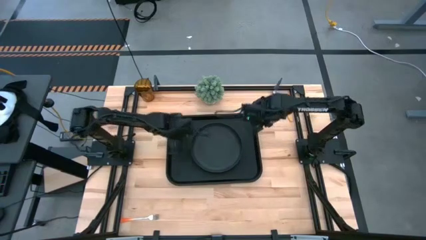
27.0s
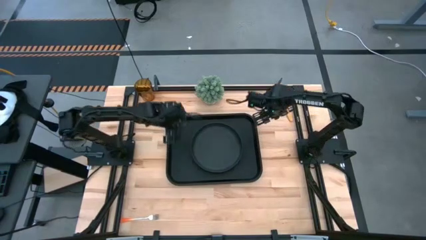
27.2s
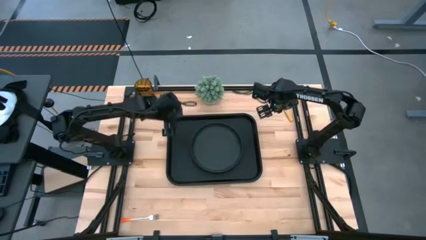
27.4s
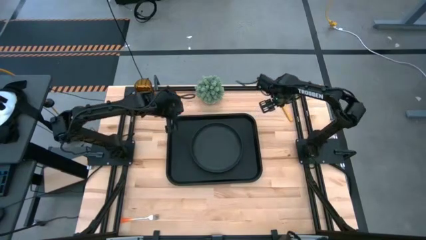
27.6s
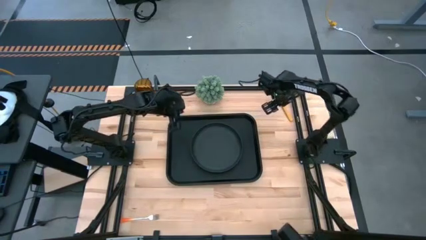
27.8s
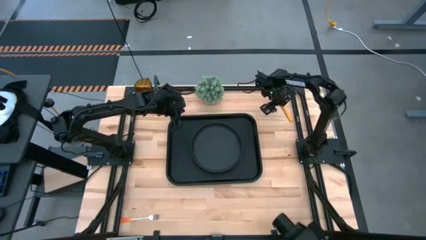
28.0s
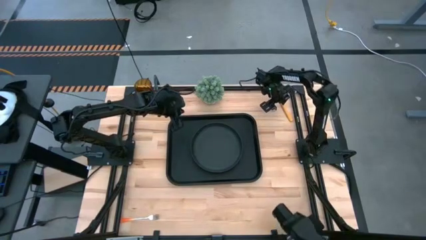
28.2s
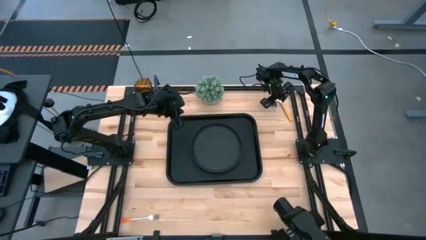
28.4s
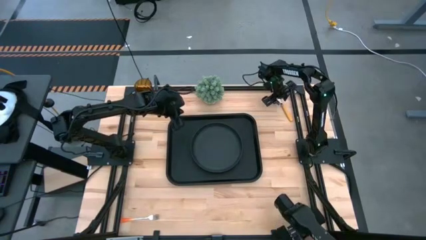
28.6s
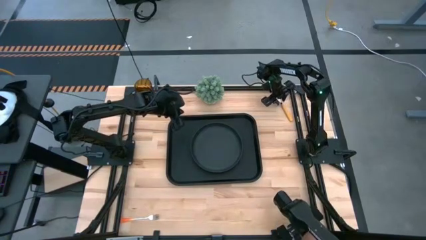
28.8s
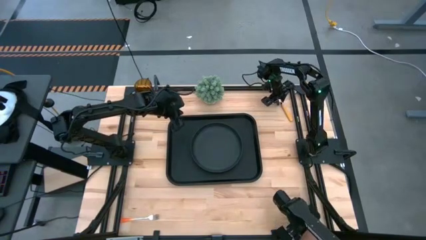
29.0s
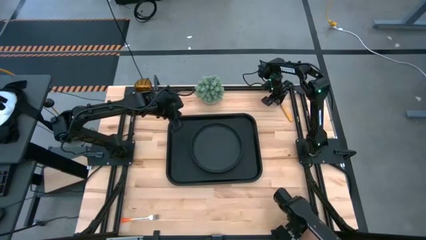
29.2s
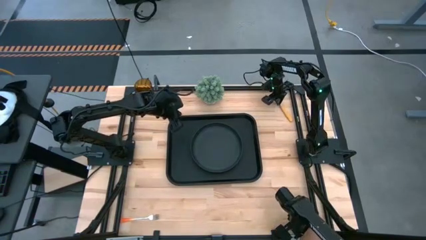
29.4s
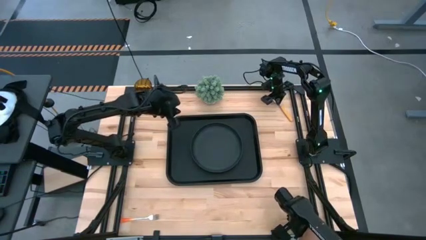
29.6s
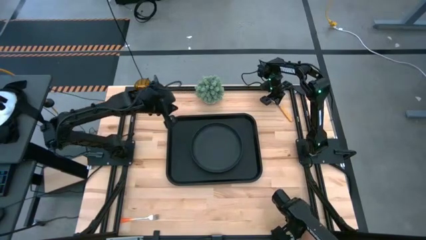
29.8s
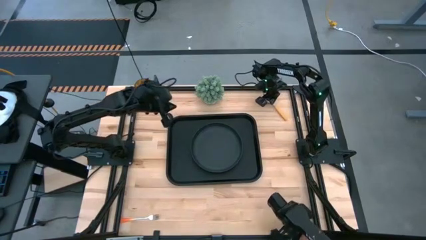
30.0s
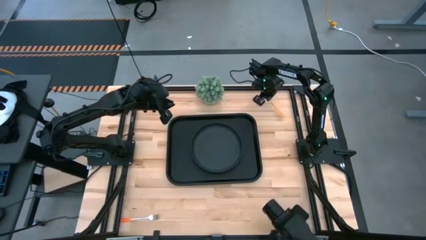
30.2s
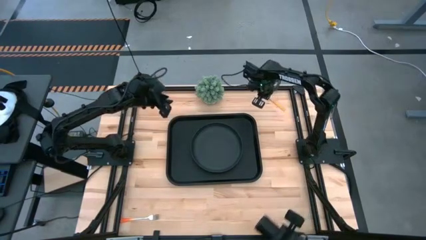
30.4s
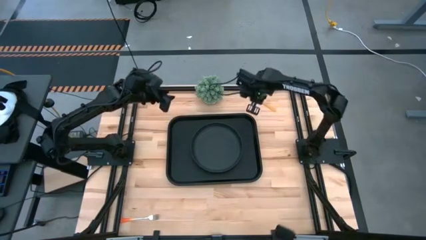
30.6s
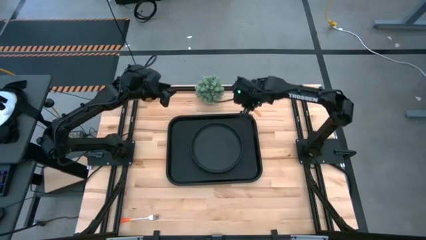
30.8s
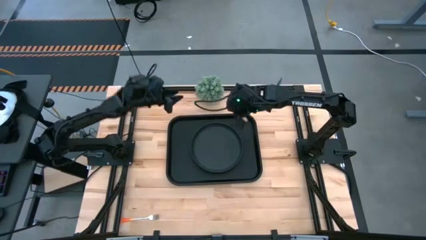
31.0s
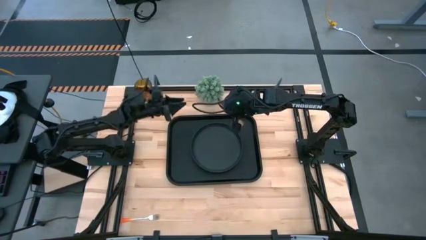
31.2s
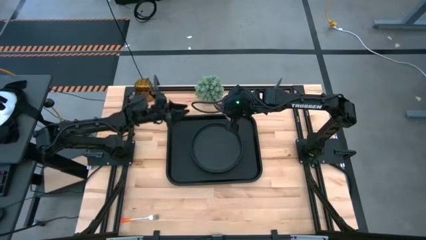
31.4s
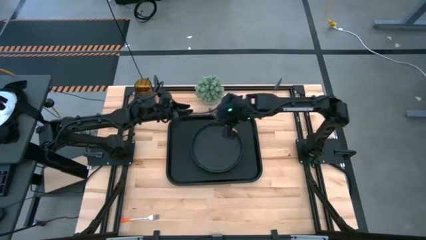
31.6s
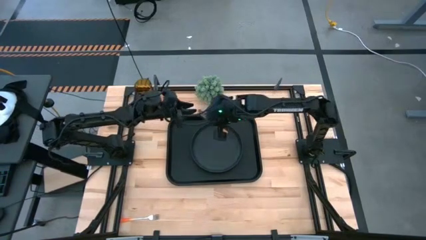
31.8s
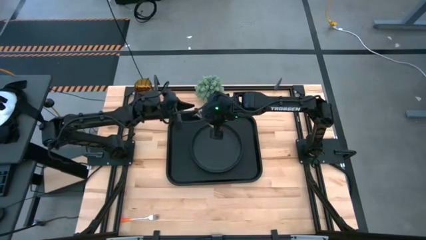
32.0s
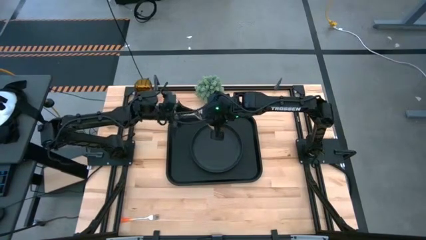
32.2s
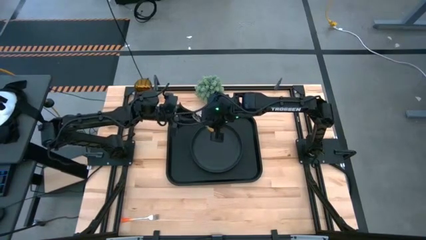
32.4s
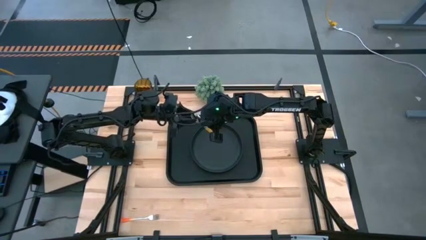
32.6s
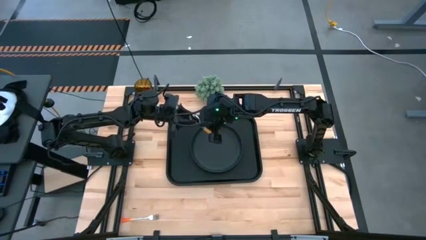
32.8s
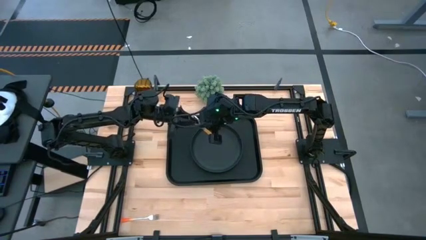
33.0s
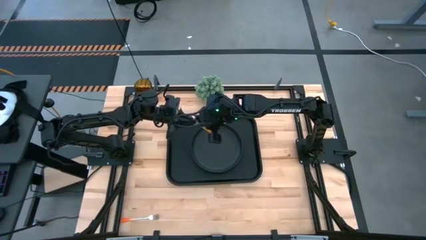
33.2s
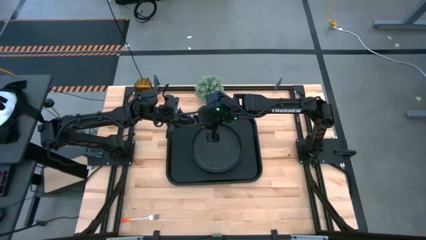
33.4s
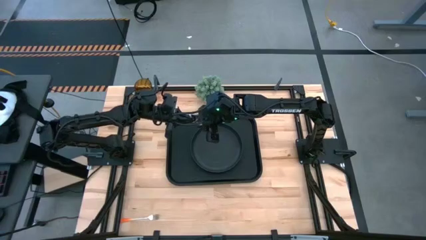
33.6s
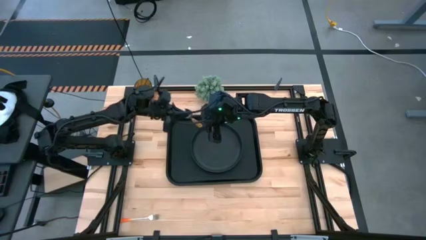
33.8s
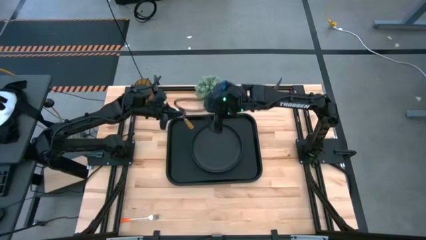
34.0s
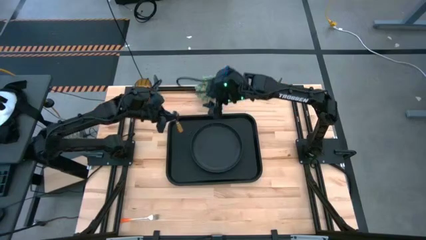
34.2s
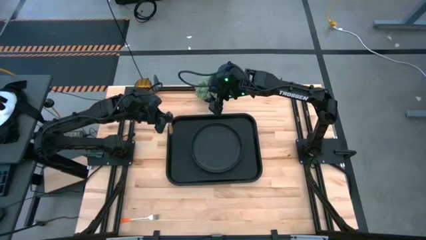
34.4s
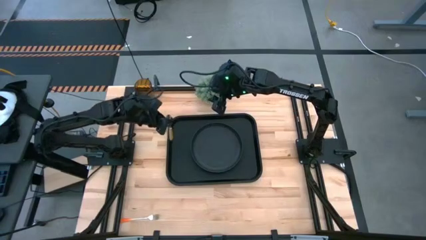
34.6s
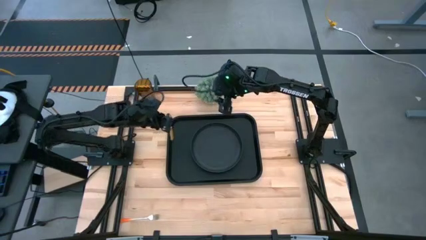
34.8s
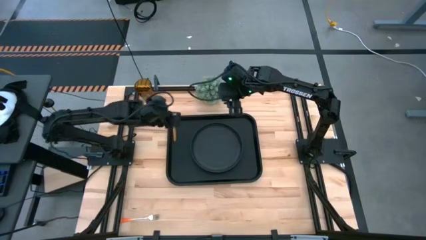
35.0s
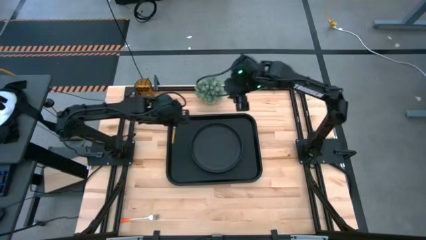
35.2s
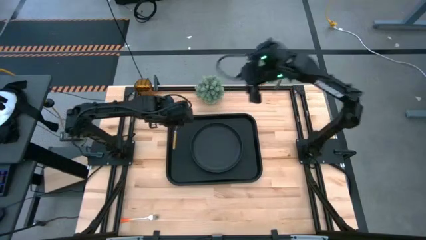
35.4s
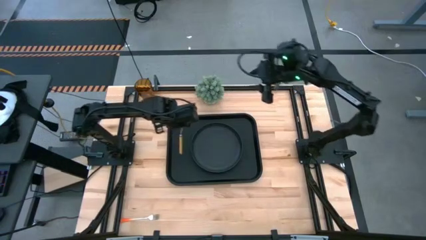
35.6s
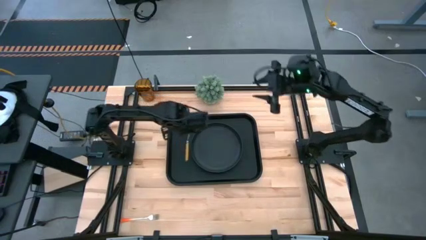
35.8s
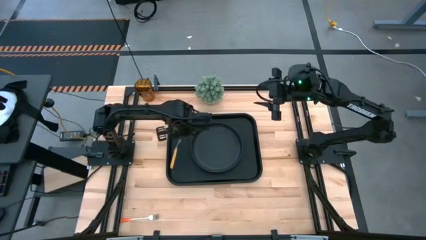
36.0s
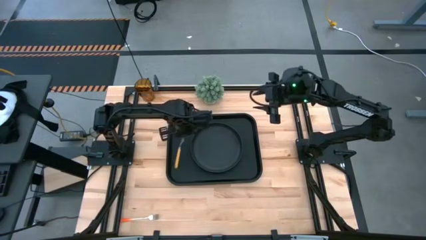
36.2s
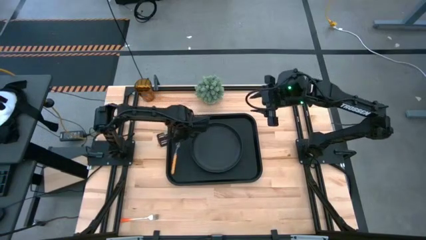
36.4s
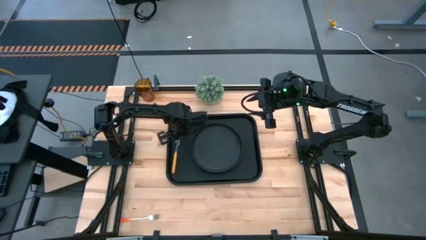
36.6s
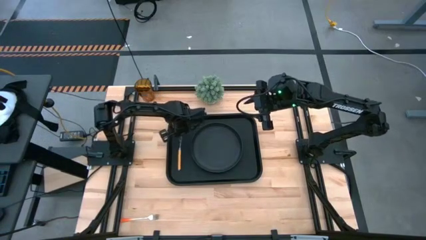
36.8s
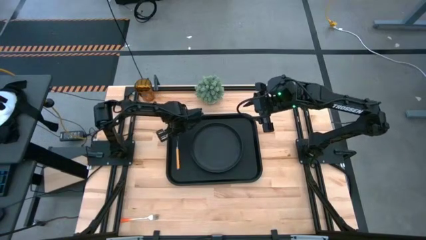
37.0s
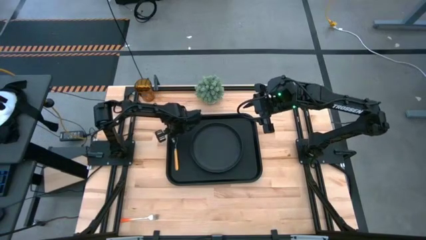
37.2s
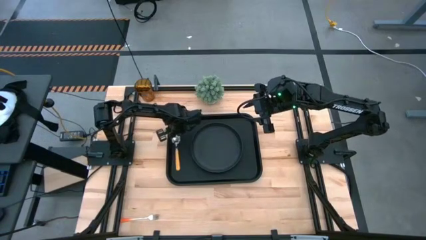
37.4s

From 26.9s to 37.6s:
Task: Pick and place plate/cup/fork/spoon on tray
Put the yellow spoon on the black serving tray to the left of the black plate
